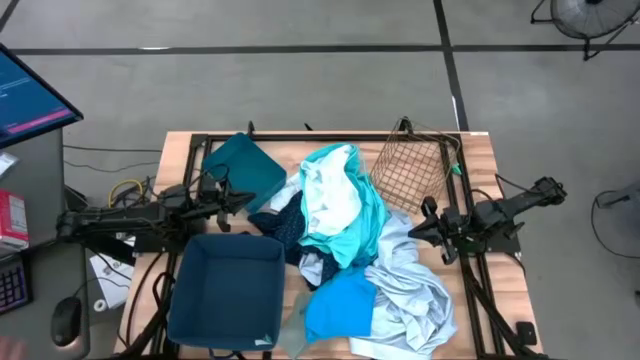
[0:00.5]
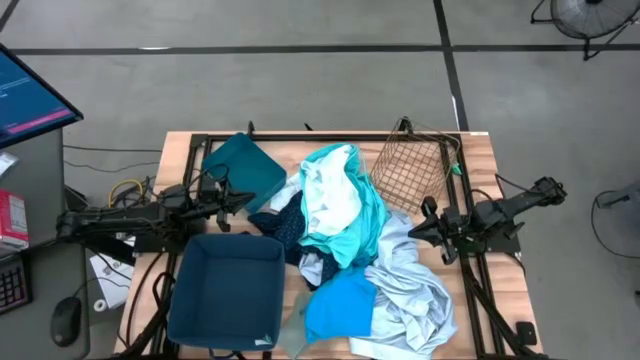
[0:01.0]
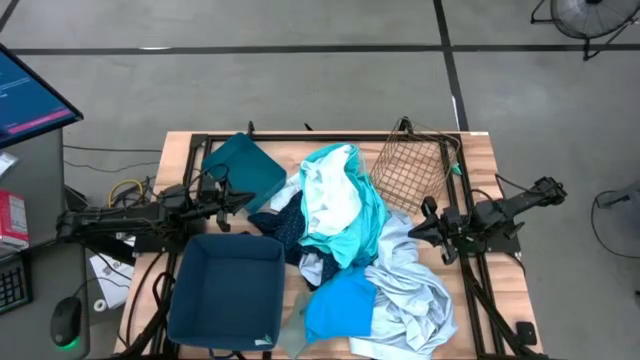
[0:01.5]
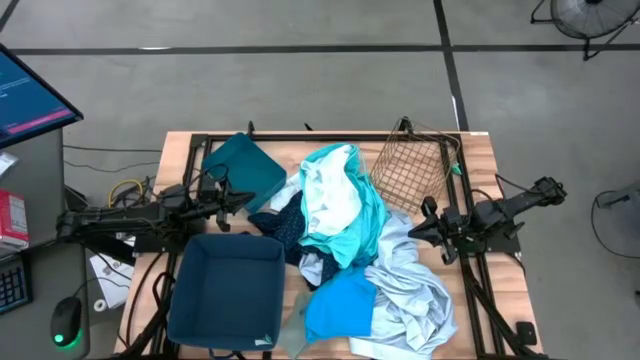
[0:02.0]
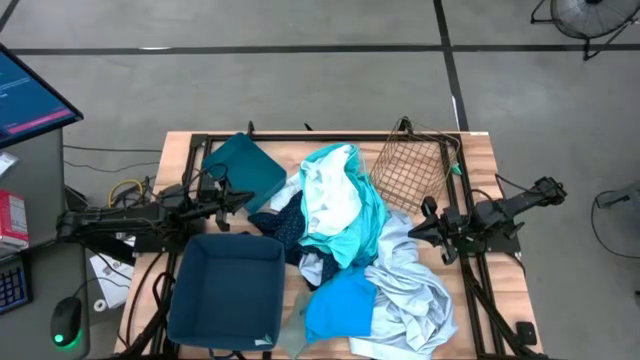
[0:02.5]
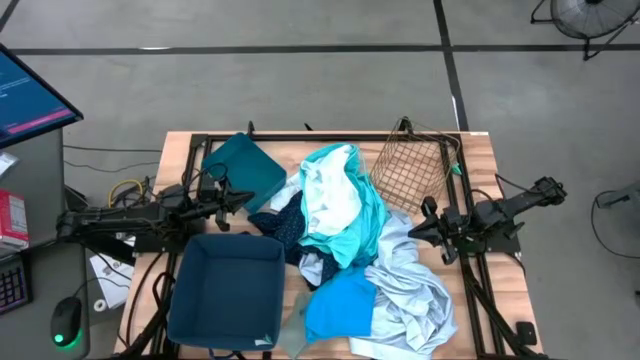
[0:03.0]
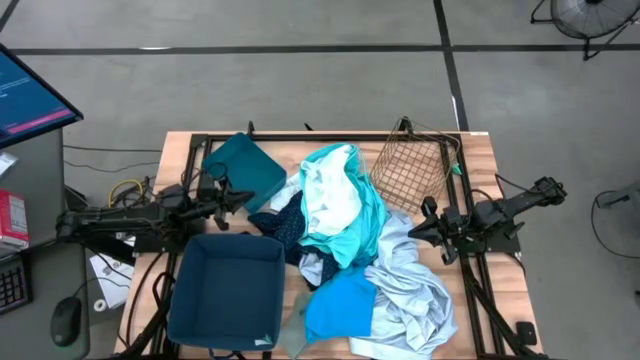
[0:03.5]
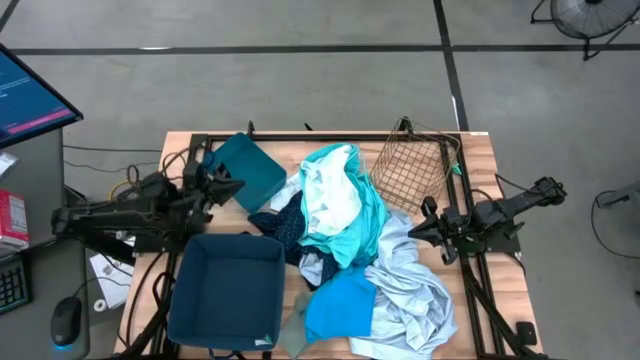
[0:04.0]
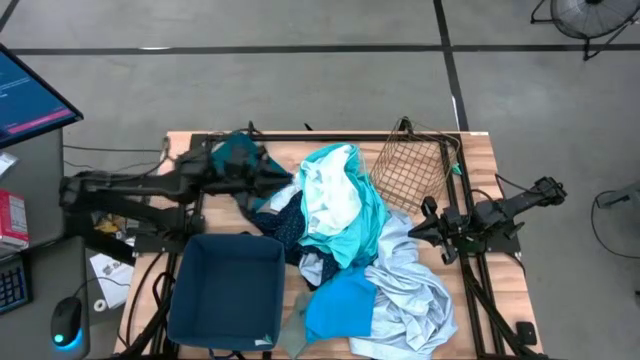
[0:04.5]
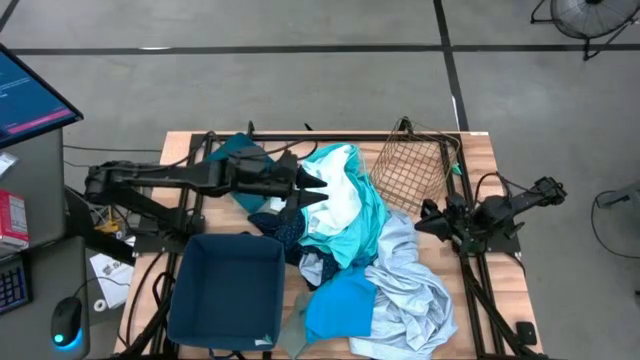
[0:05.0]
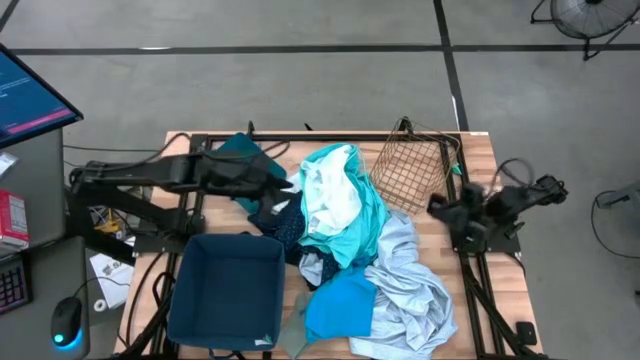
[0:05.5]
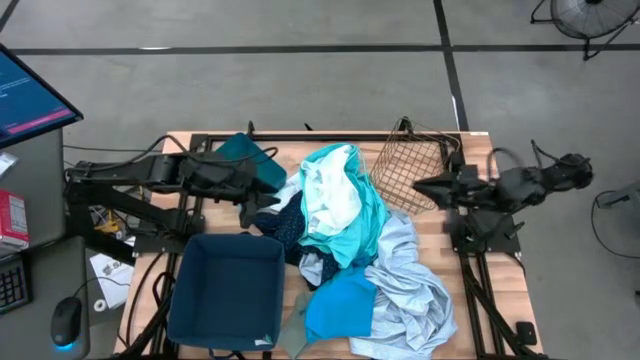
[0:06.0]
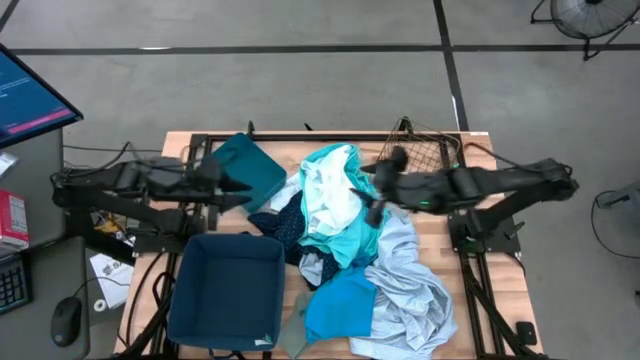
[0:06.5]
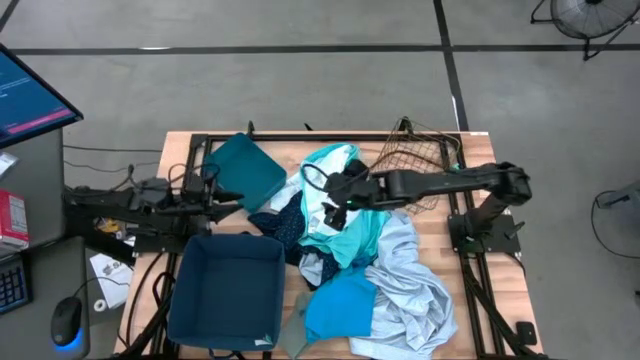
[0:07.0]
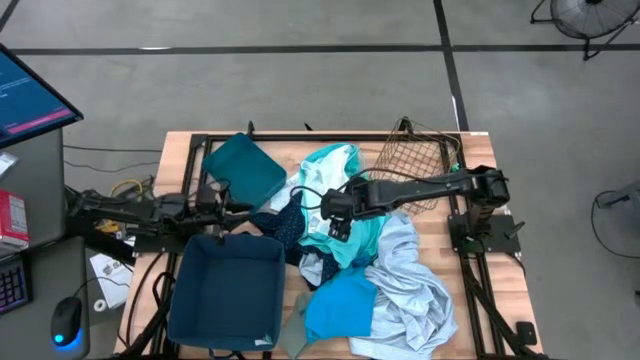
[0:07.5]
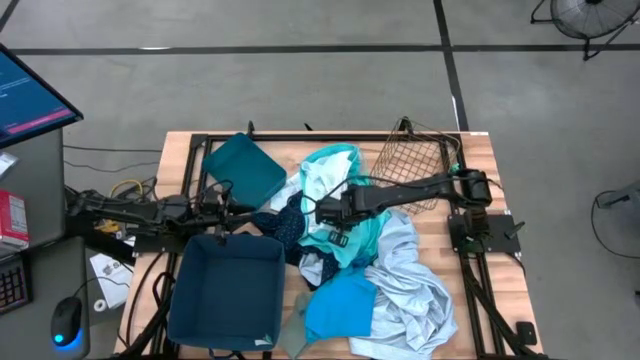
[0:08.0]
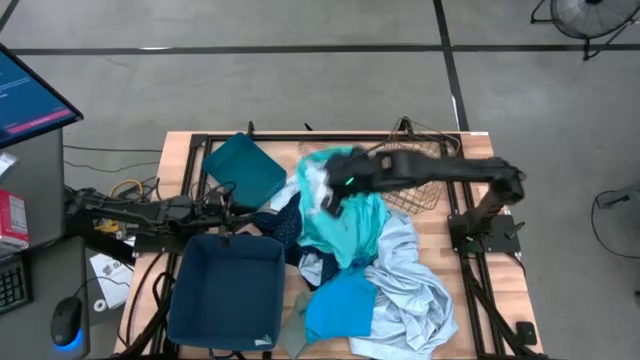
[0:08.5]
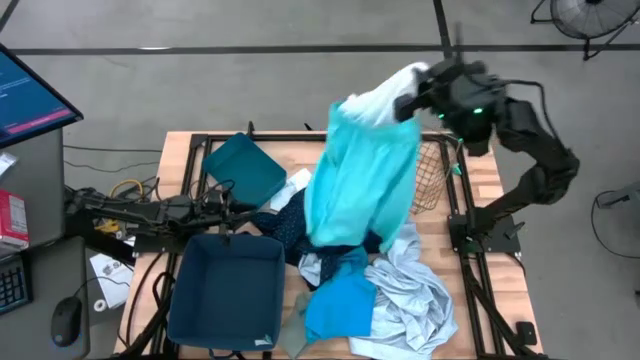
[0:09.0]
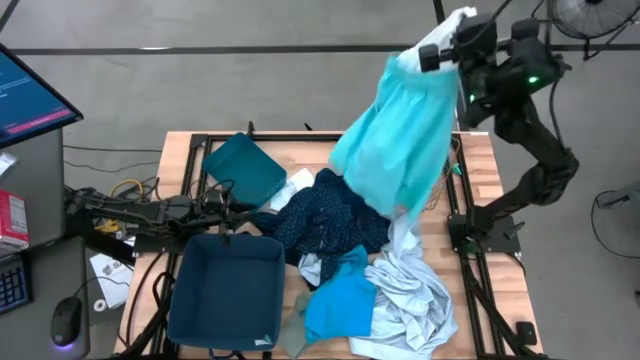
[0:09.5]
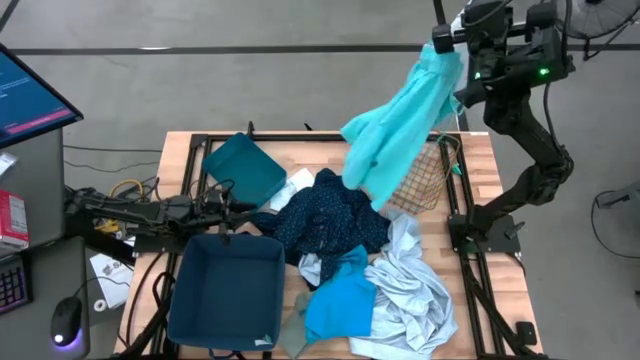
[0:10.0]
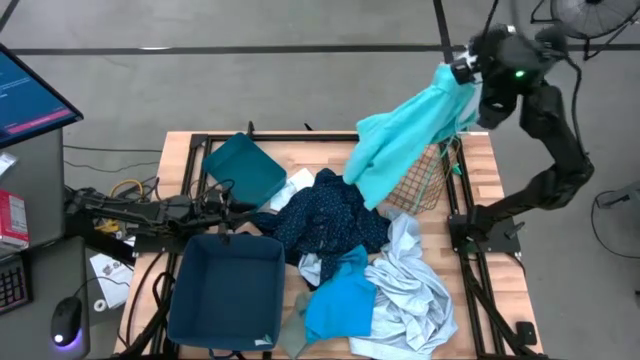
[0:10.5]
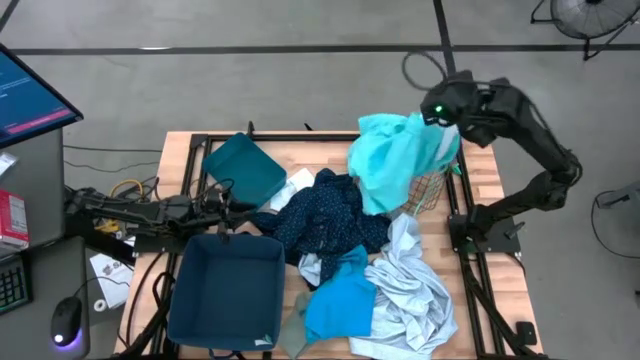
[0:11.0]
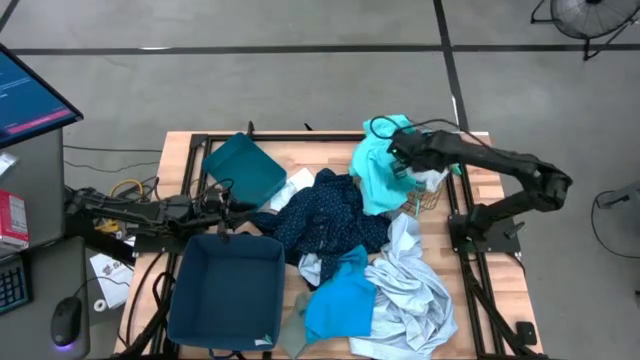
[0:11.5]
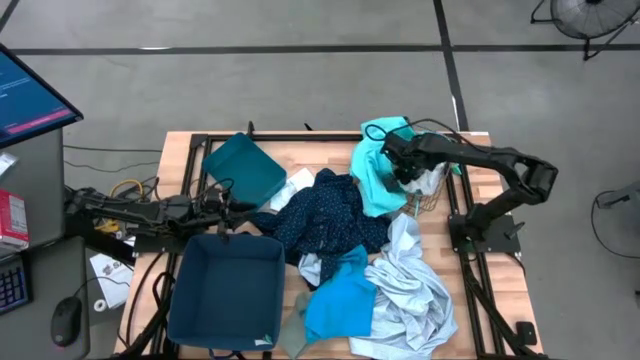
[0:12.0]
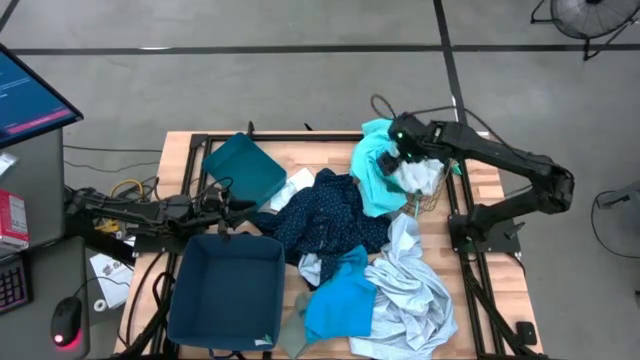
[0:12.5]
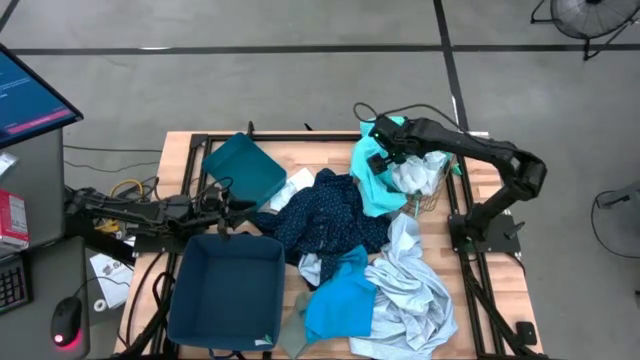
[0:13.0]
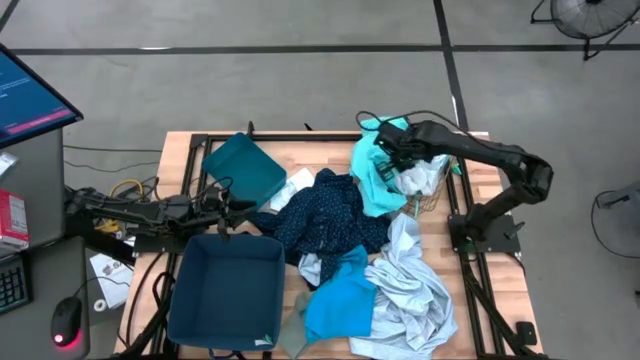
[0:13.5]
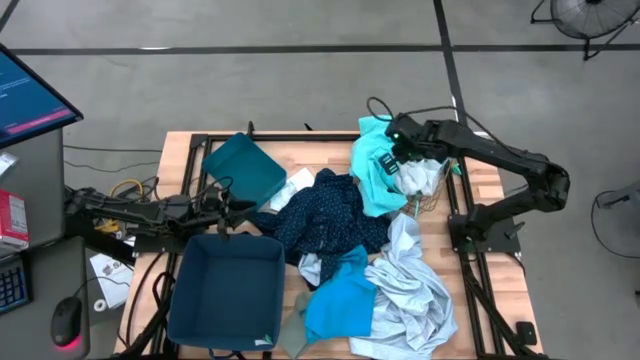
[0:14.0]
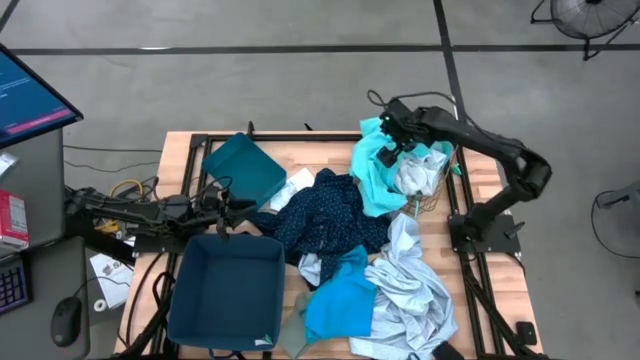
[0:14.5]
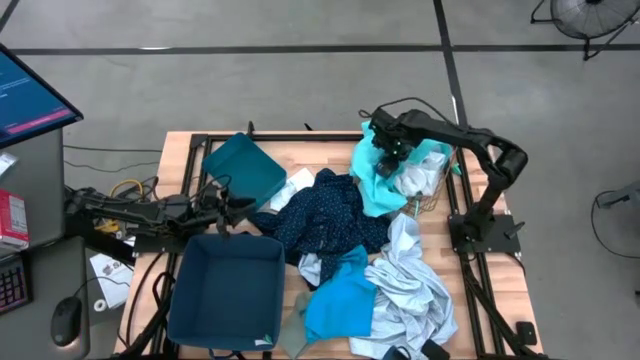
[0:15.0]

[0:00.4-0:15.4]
Task: Pick & Place Cloths
Put the light blue shorts into the wire basket

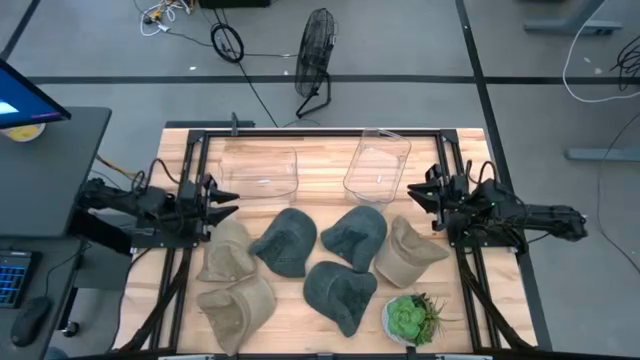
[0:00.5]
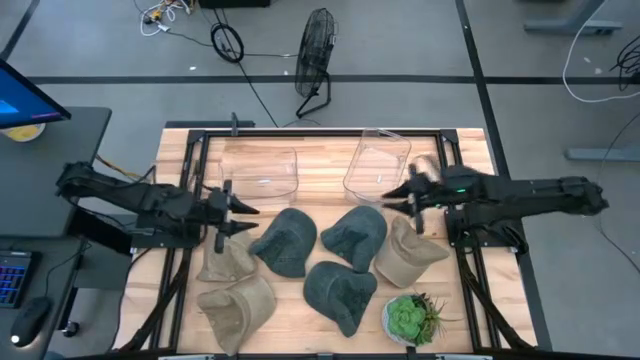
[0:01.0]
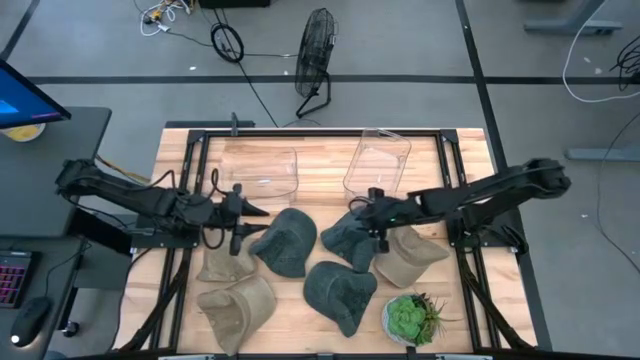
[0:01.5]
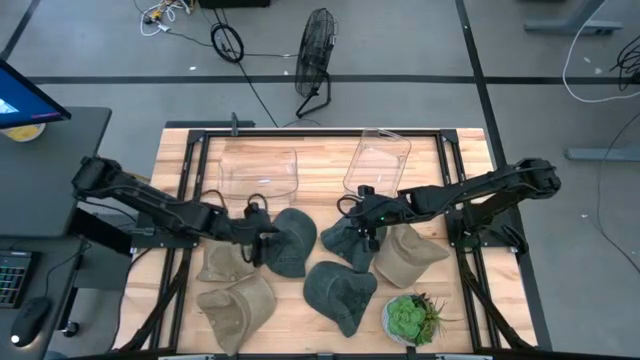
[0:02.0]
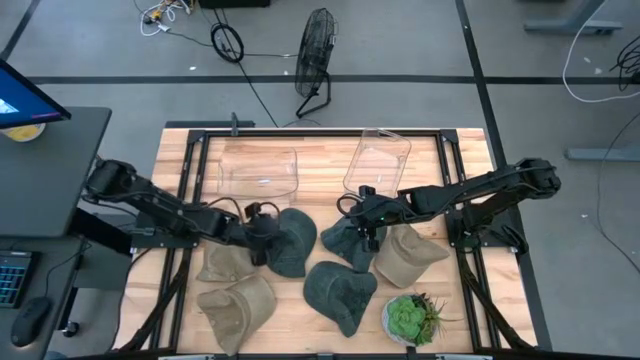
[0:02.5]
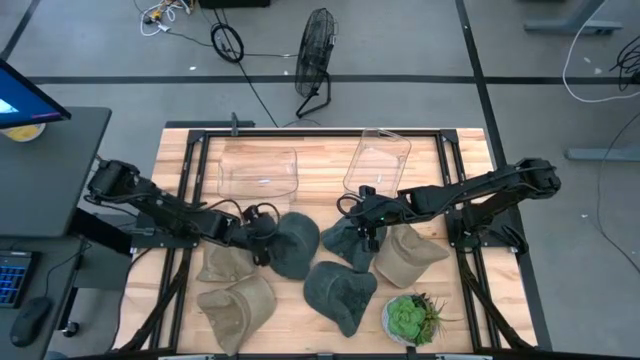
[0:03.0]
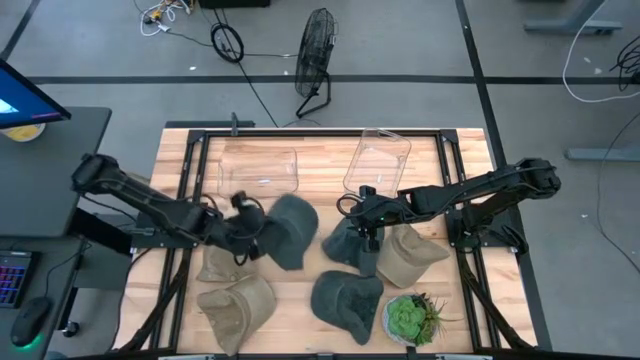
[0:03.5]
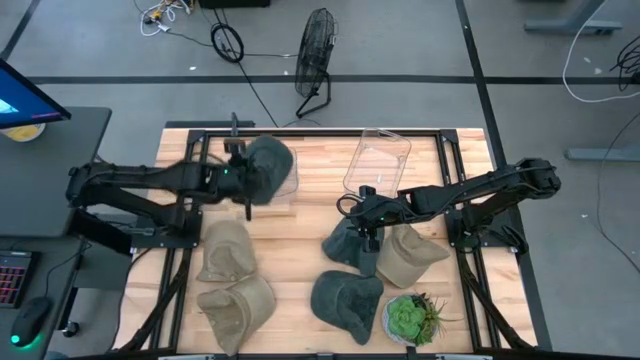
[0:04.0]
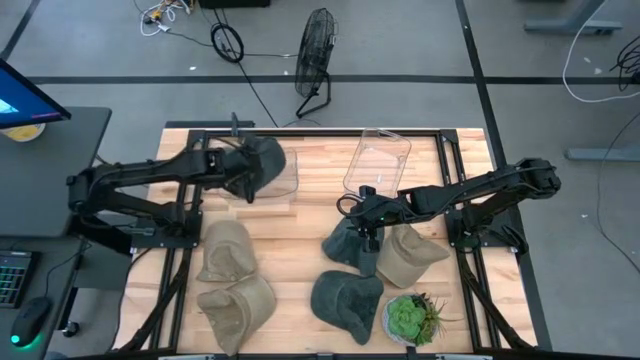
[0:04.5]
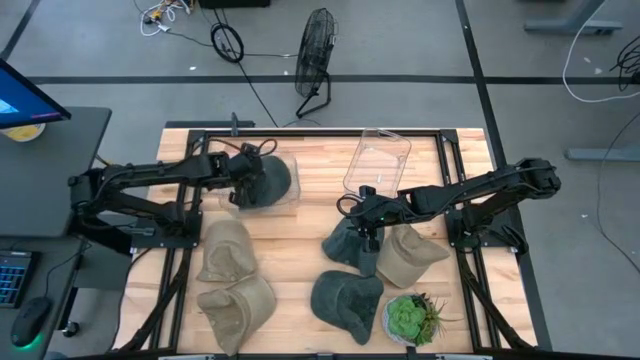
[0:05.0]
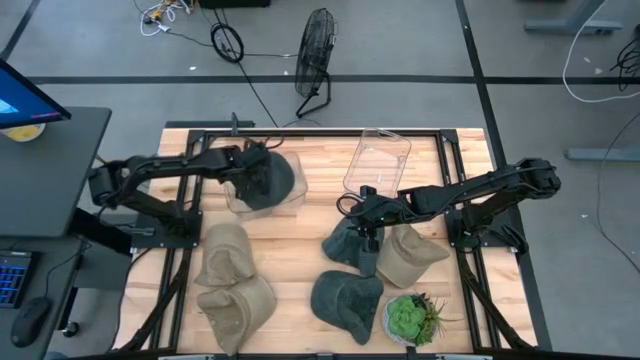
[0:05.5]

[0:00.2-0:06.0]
Task: Pick & Place hat
Put the top left black cap into the left transparent bin
